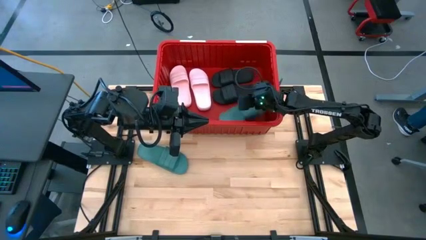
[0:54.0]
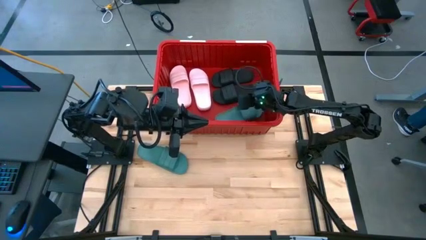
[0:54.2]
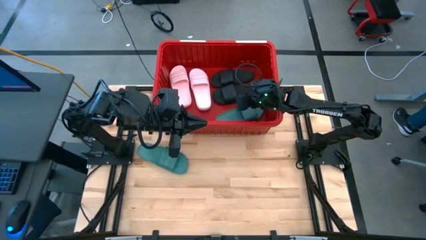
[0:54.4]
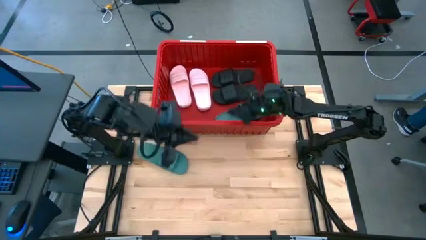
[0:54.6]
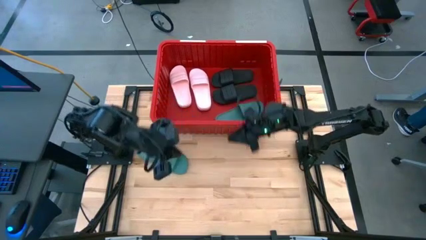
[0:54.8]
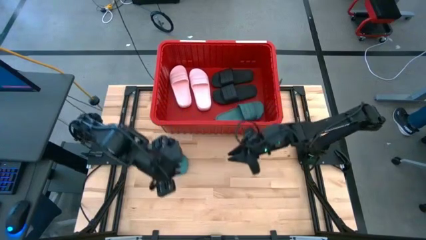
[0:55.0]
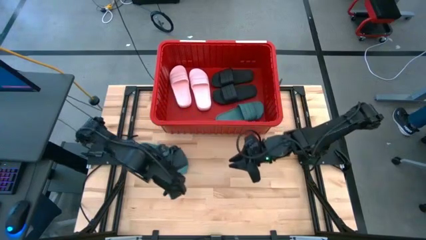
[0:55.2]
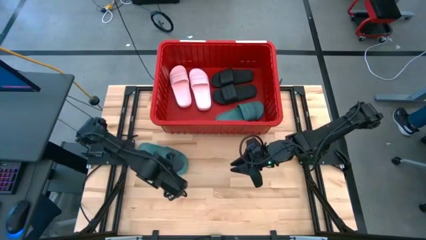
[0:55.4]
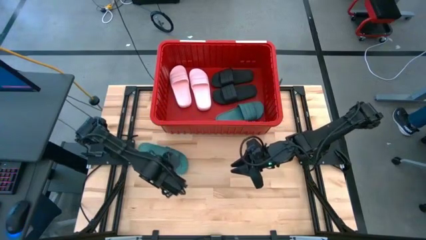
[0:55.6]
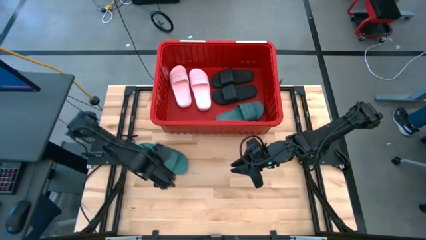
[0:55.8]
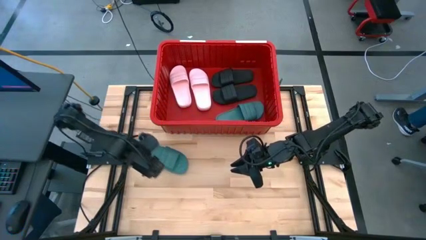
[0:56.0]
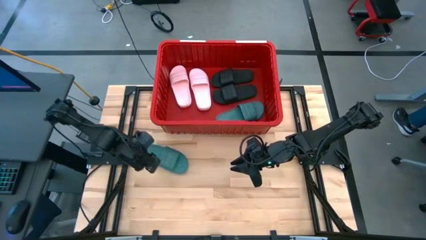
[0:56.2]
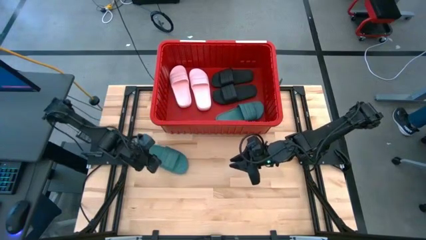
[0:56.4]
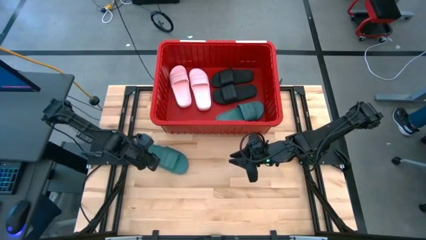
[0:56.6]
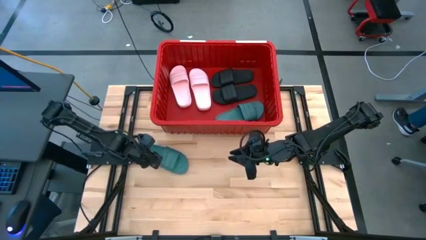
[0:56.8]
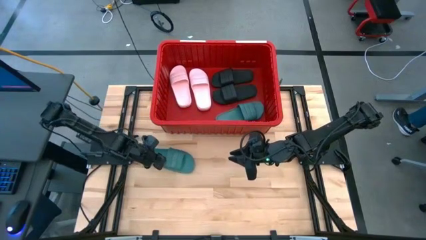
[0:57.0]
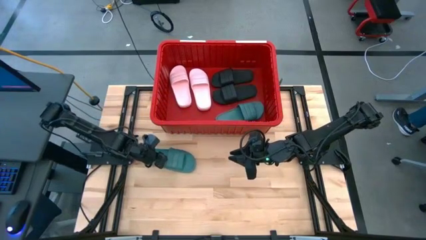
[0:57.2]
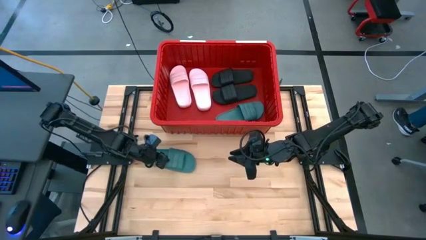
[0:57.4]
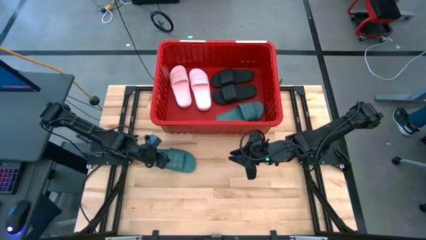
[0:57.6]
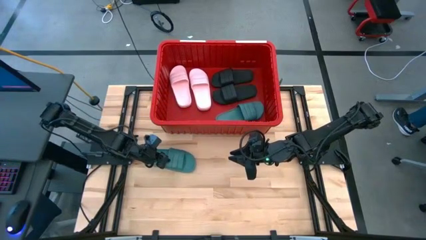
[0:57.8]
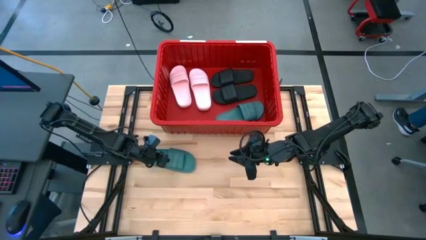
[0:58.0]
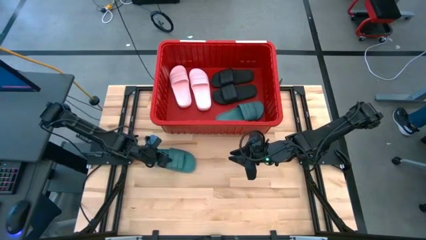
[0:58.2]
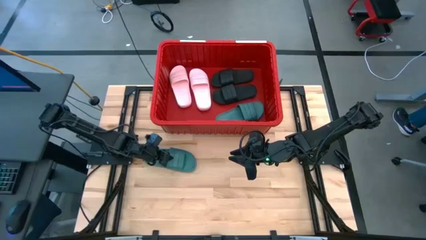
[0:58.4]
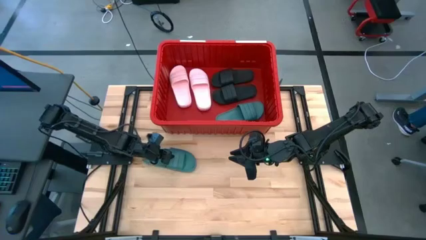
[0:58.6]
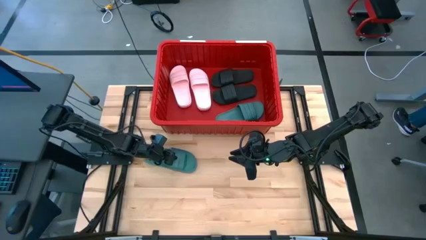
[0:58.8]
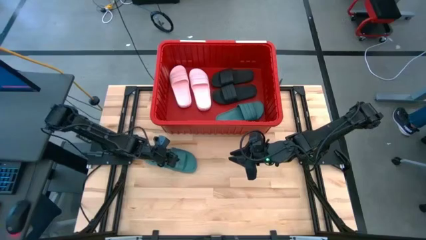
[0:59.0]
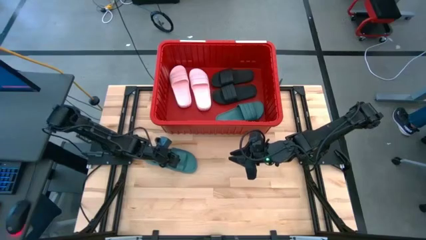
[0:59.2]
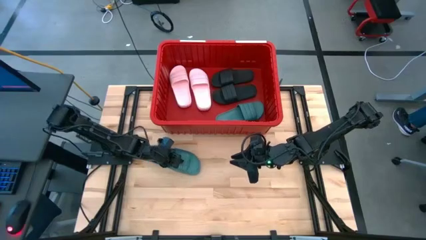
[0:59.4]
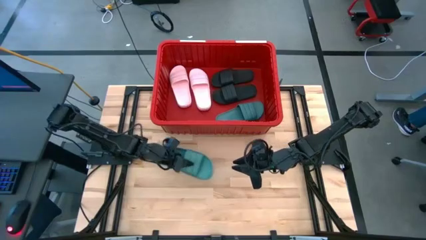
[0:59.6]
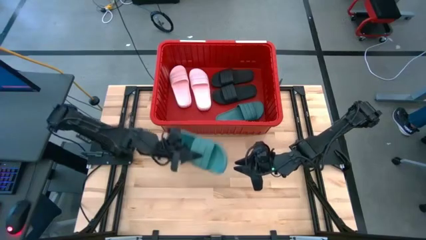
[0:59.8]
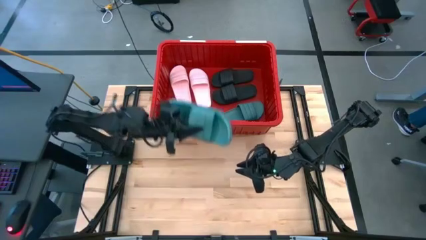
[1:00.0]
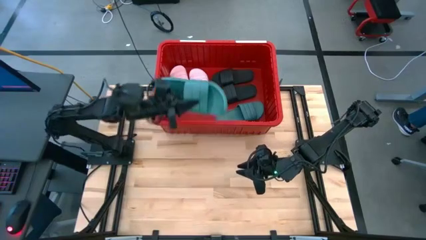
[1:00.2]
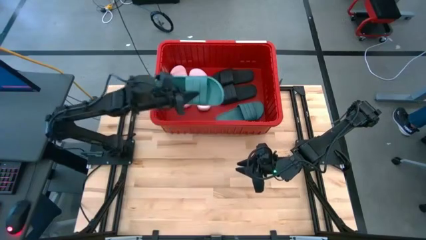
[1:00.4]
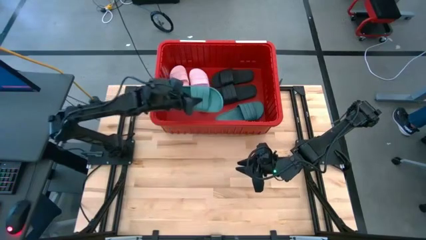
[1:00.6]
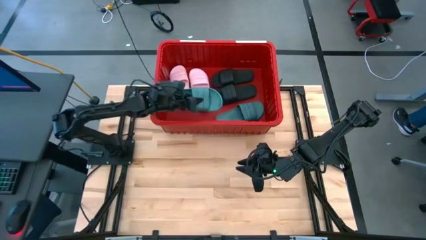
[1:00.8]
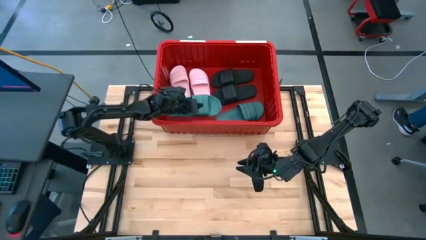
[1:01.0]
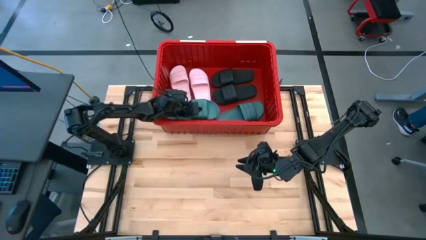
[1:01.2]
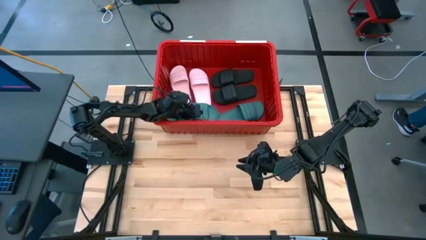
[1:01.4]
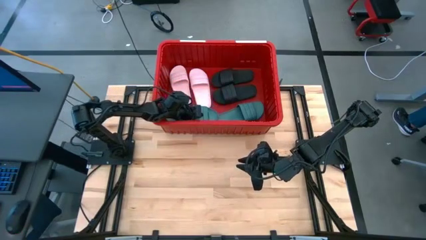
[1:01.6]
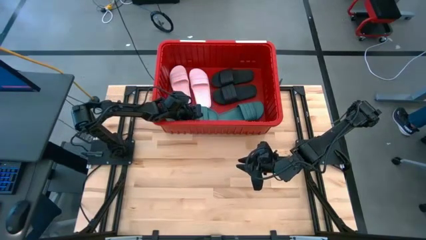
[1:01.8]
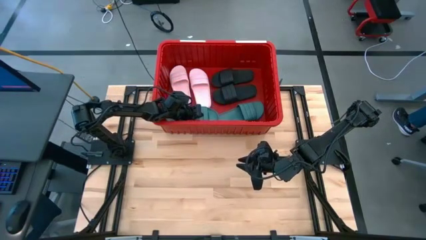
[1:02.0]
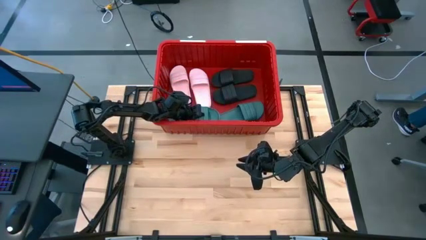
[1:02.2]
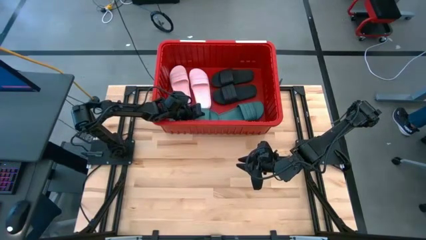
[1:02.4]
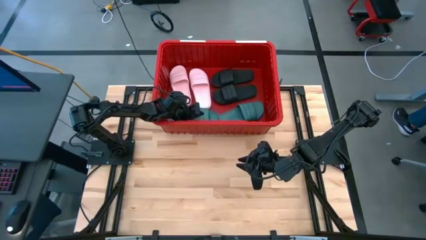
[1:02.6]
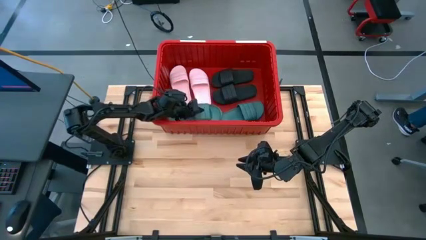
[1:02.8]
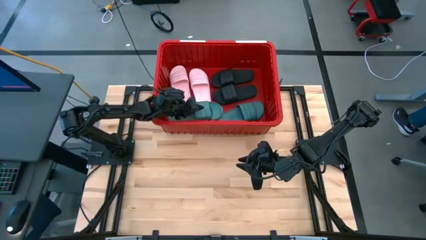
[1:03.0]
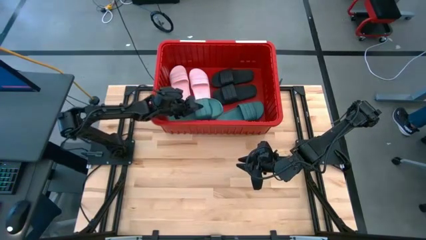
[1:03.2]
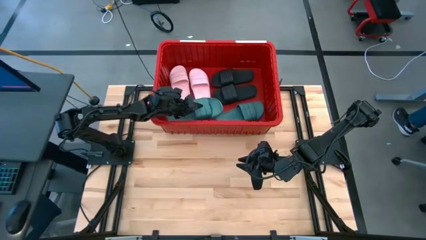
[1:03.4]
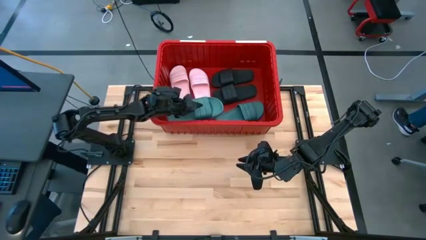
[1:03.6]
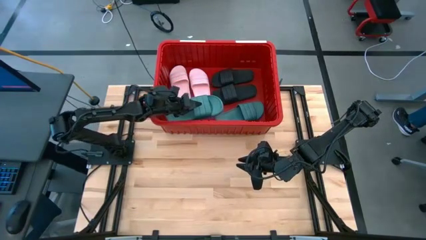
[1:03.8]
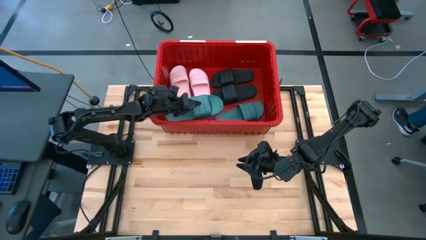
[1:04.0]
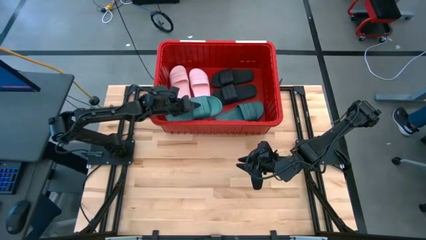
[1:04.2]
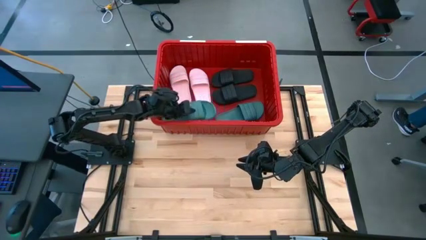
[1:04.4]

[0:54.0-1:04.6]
Task: Pick and place slides into bin
Put the green slide into the red bin
